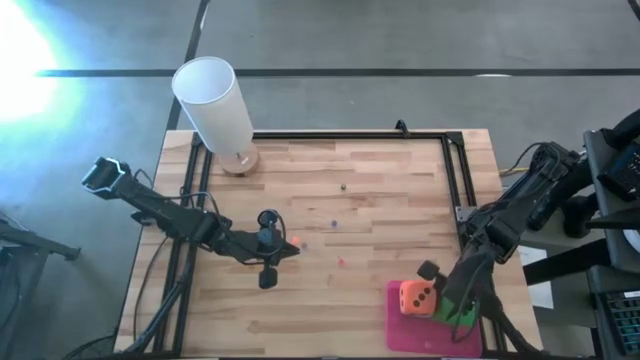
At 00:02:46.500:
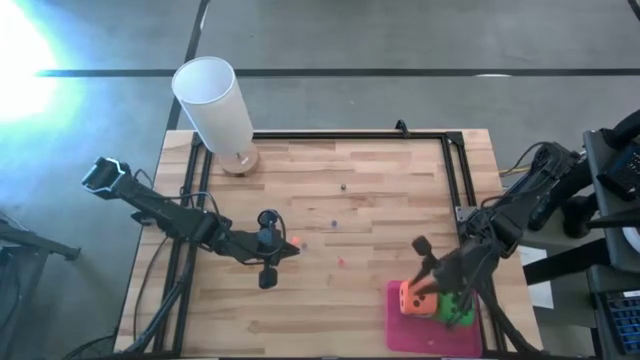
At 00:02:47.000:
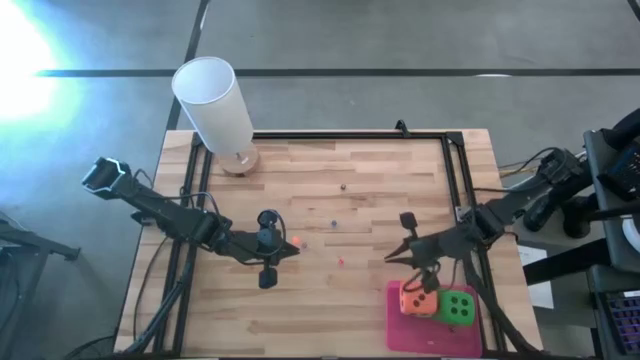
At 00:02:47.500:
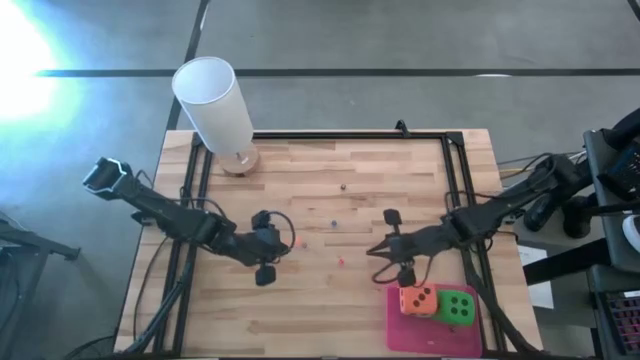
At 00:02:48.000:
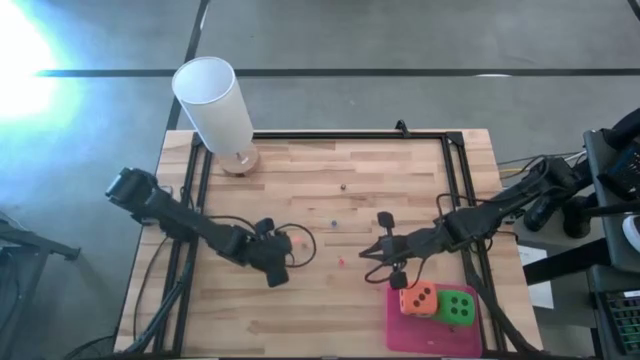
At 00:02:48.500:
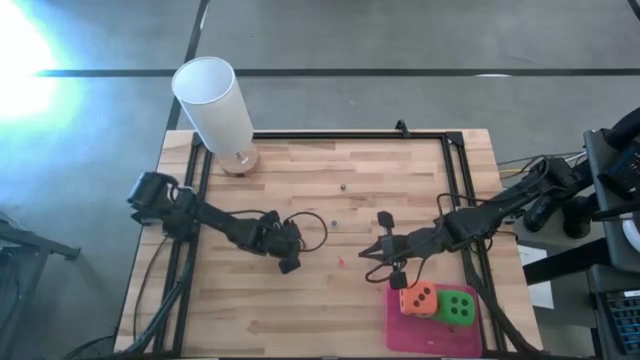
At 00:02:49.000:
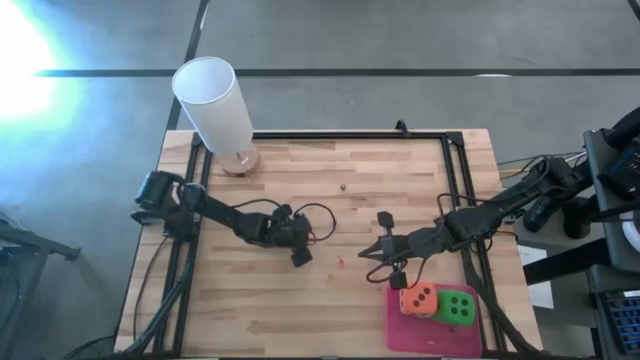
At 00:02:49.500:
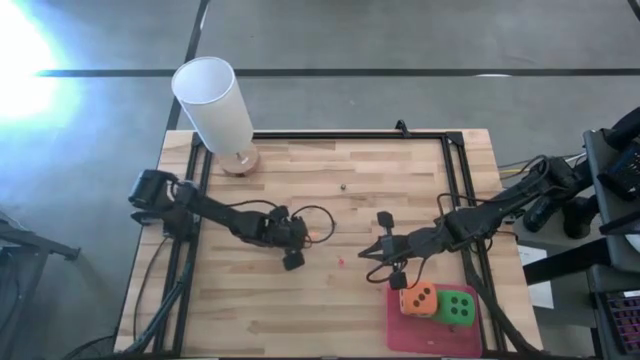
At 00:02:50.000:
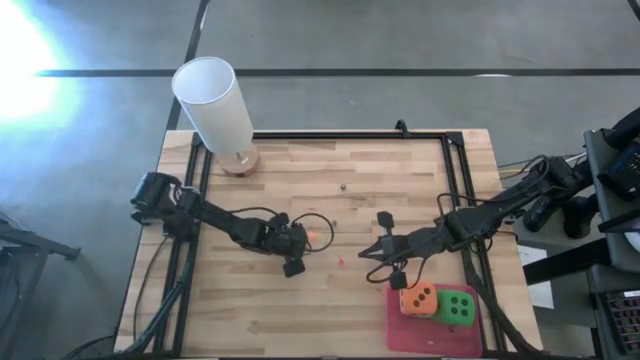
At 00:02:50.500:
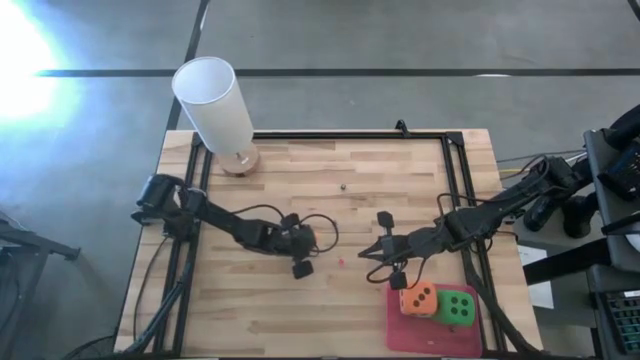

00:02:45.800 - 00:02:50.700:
Task: Pick & Place Dice
Adjust the small dice on the table

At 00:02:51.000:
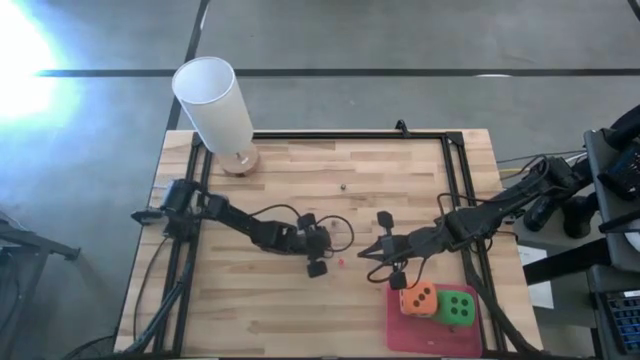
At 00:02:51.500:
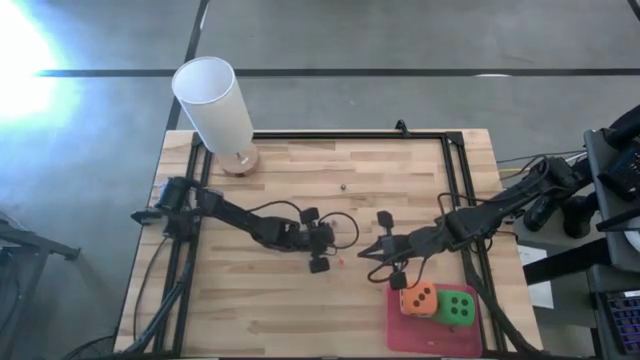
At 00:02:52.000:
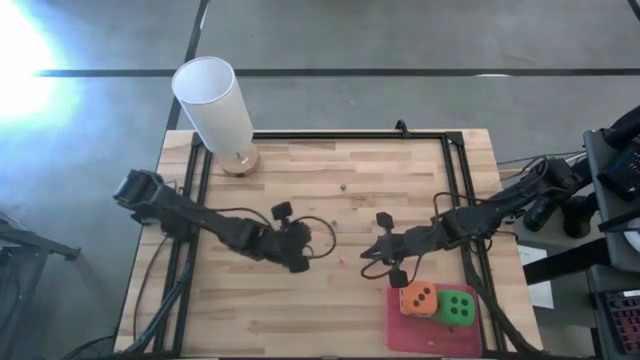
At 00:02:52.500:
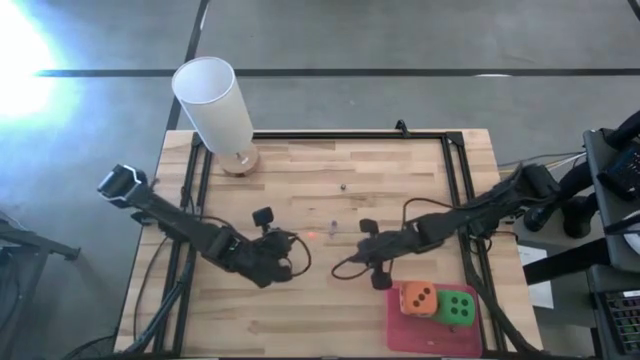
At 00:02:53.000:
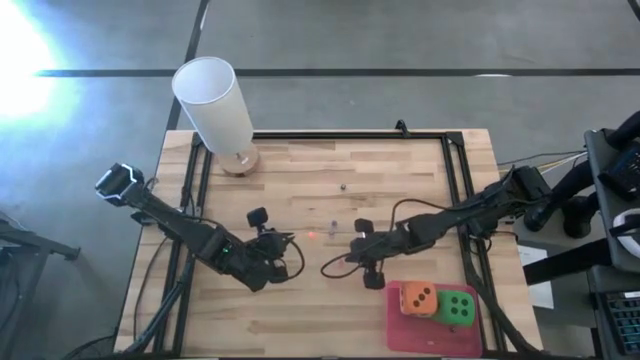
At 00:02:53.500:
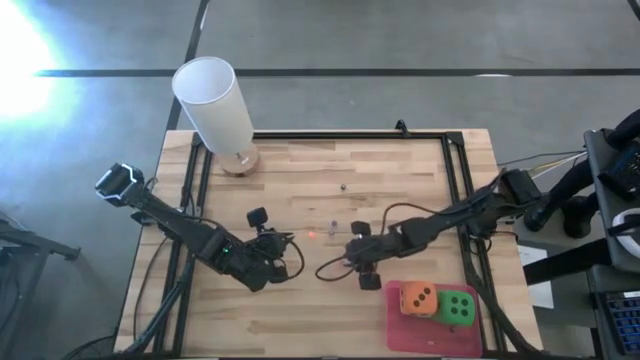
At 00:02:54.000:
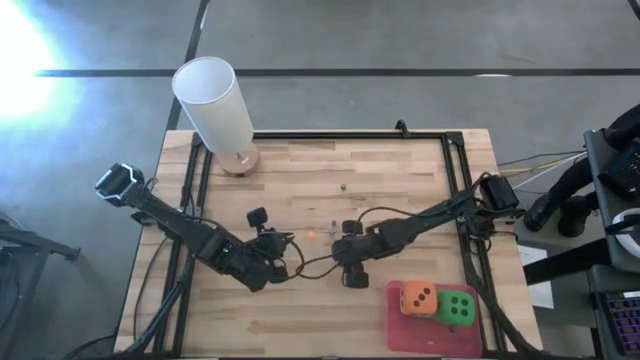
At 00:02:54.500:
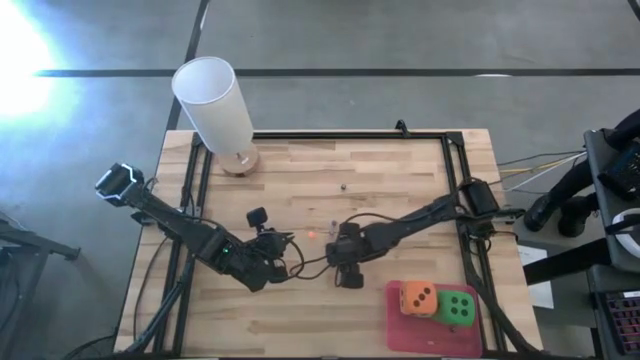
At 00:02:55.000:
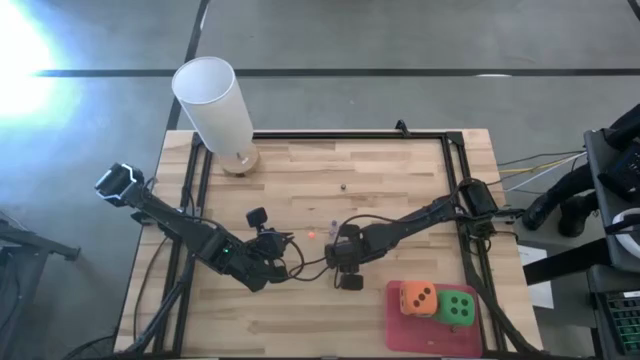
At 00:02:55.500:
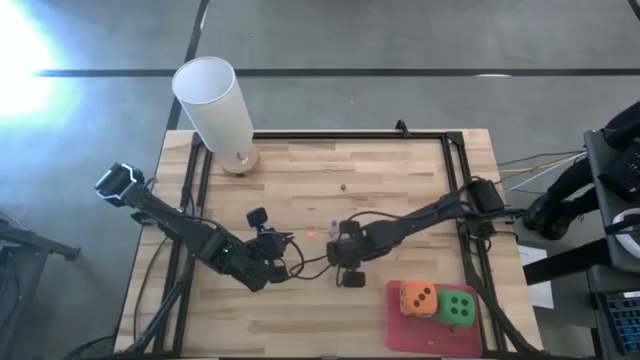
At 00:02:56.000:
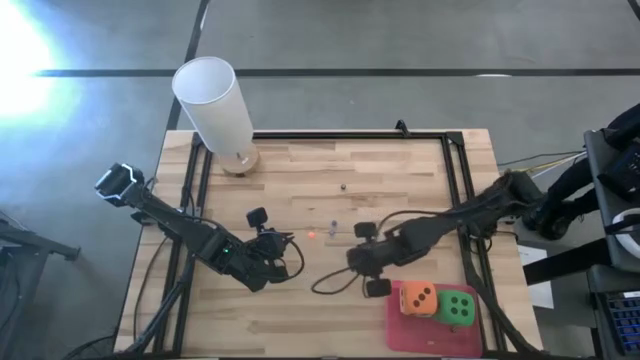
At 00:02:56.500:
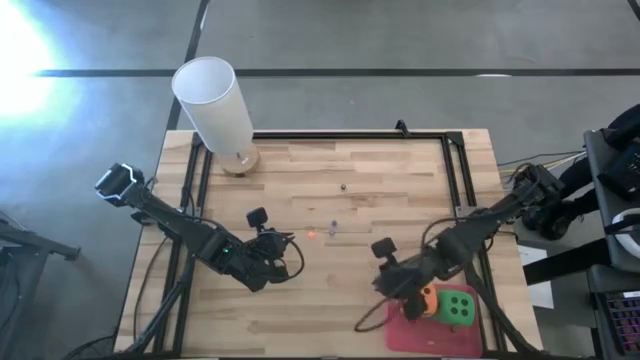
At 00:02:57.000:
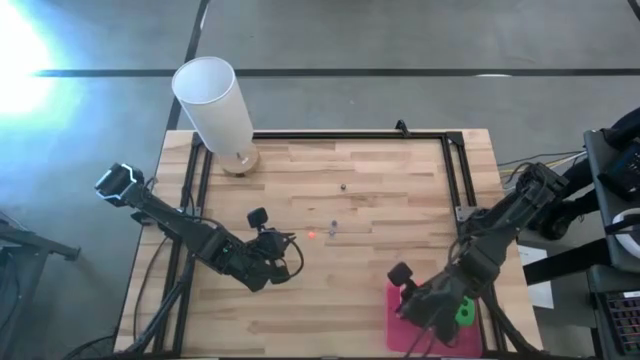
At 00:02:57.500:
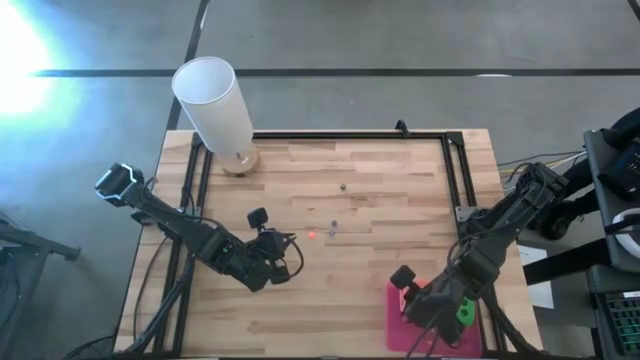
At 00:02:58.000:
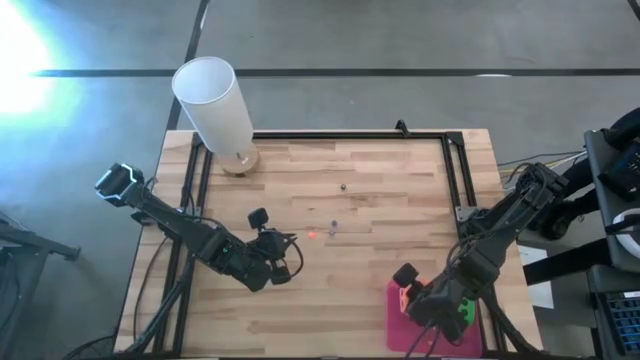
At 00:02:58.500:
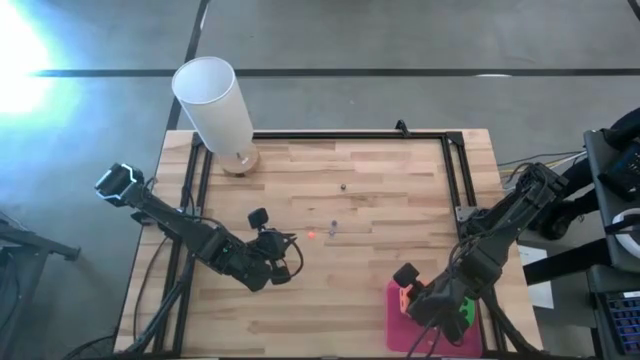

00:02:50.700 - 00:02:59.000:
Put the small pink die into the bin

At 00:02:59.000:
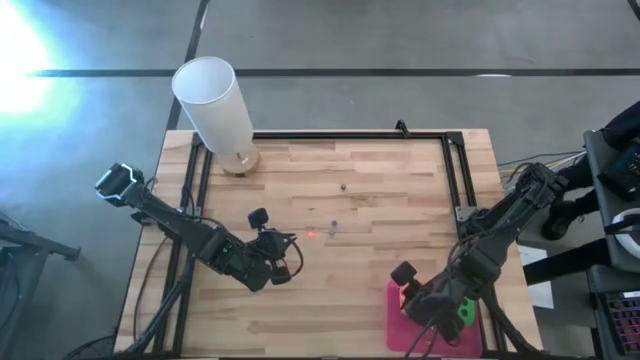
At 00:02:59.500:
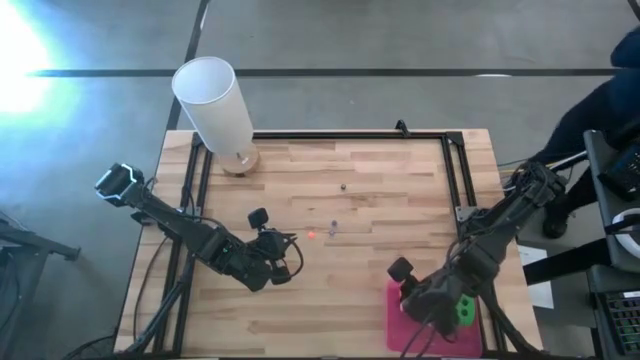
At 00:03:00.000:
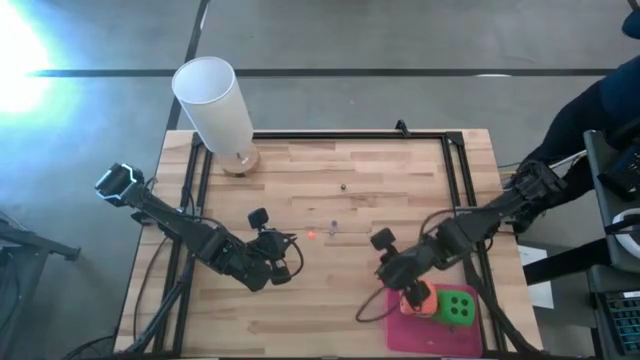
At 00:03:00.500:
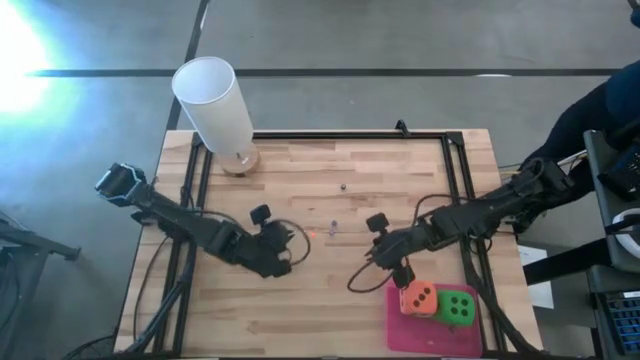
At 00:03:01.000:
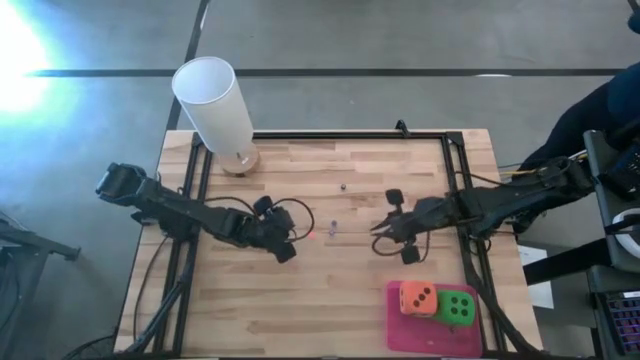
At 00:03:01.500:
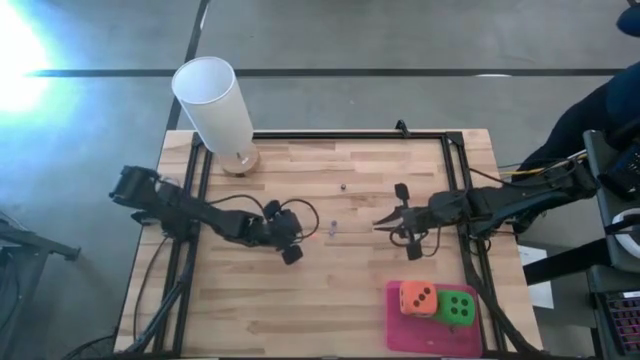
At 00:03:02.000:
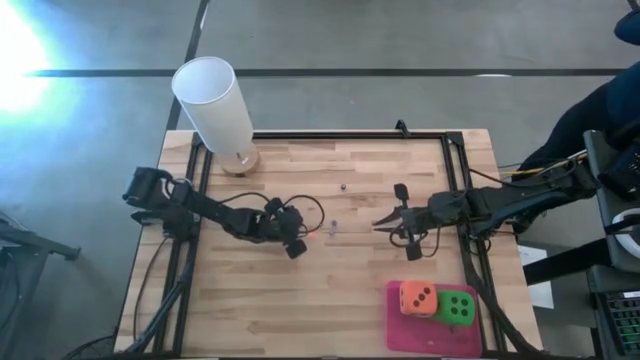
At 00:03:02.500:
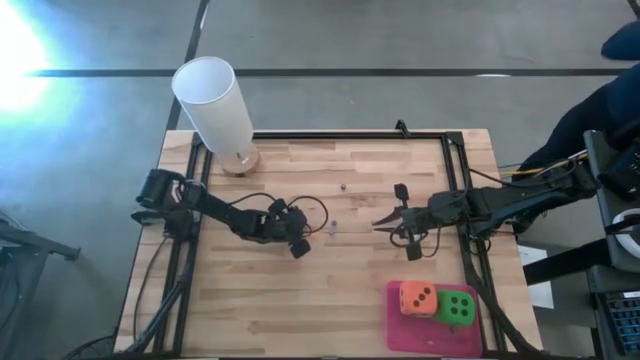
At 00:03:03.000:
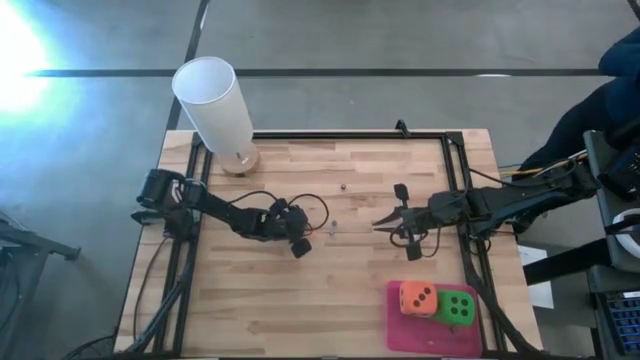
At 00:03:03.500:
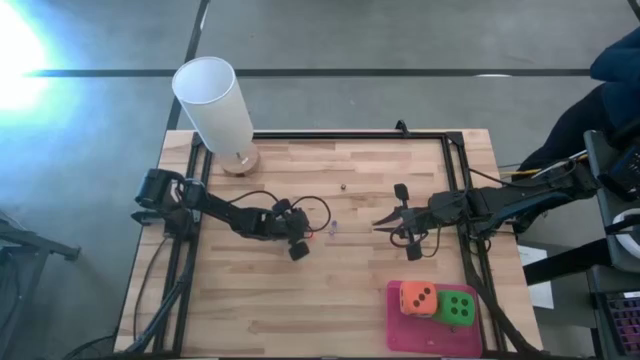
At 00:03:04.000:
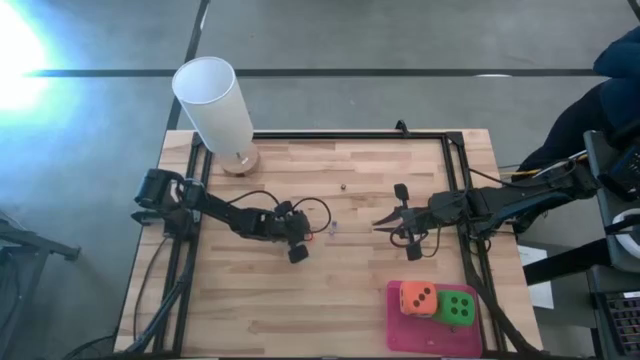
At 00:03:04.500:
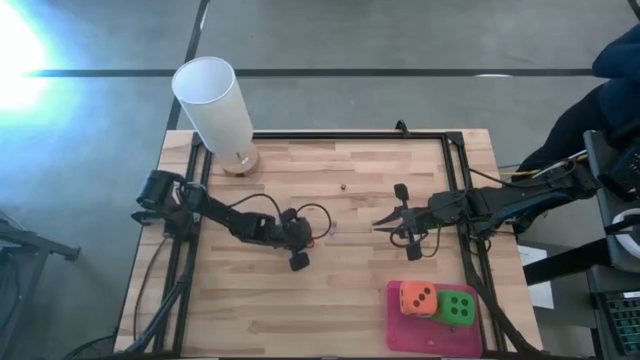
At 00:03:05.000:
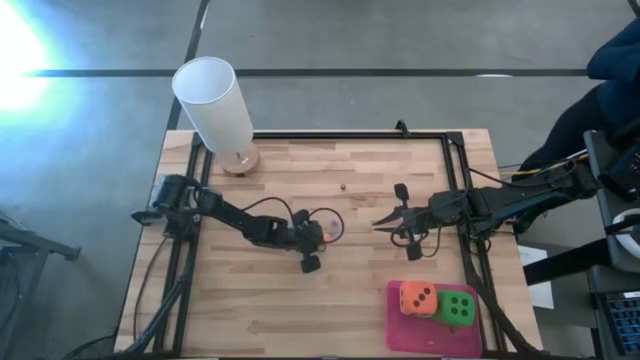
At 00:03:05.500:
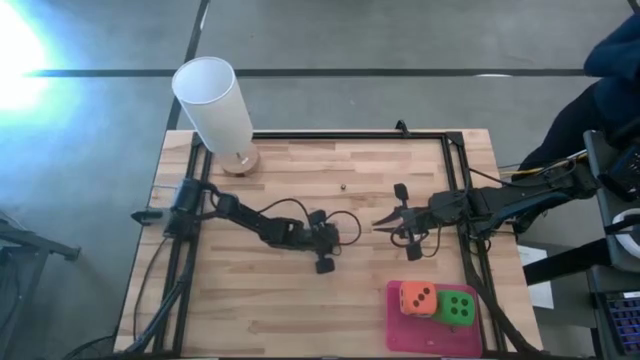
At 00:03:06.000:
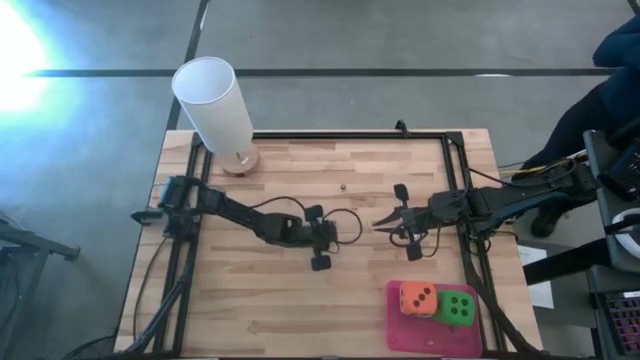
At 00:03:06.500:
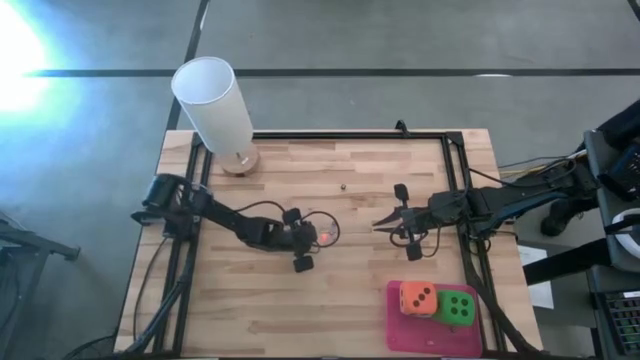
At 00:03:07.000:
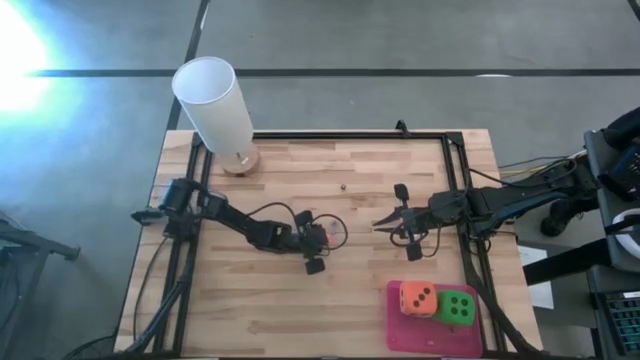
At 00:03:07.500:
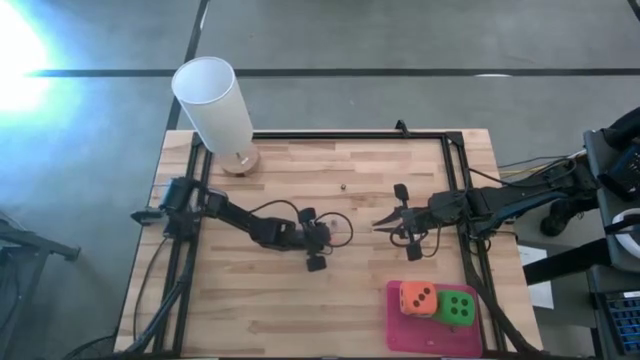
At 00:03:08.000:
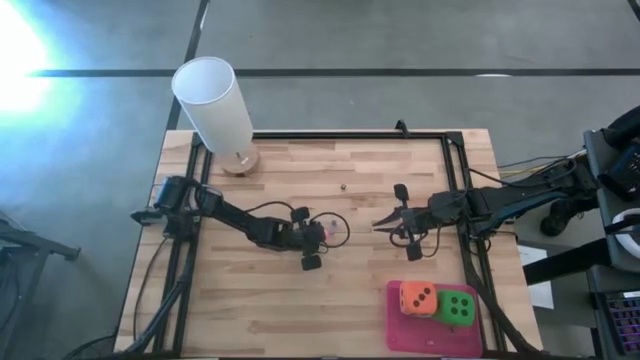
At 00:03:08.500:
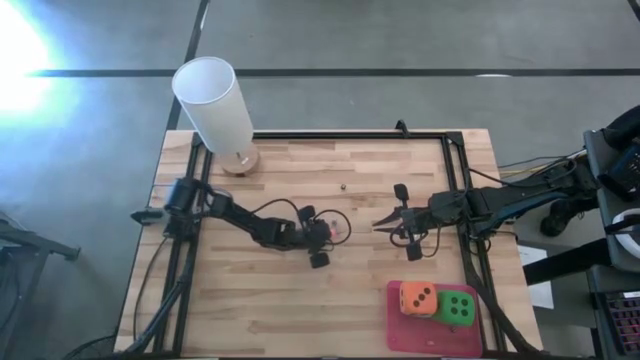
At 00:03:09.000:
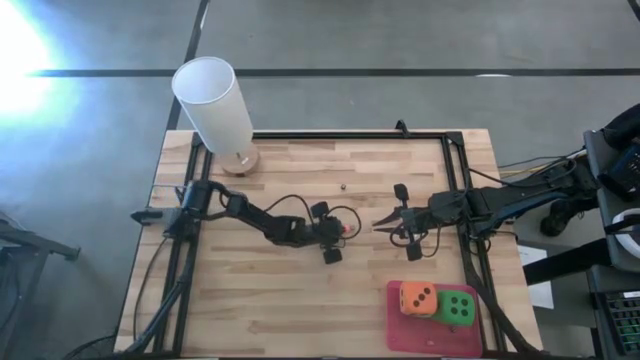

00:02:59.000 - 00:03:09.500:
Move the small orange die slightly right on the table
